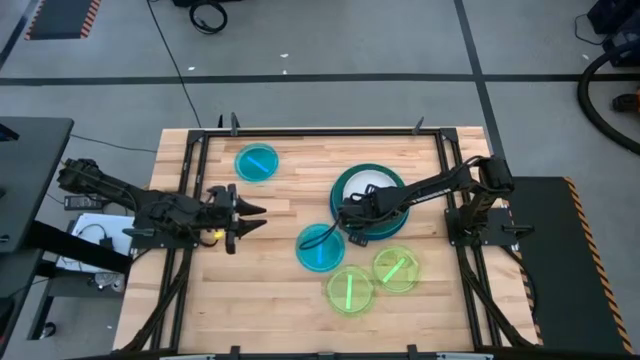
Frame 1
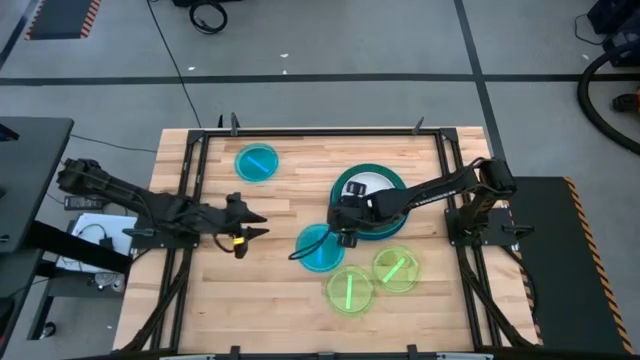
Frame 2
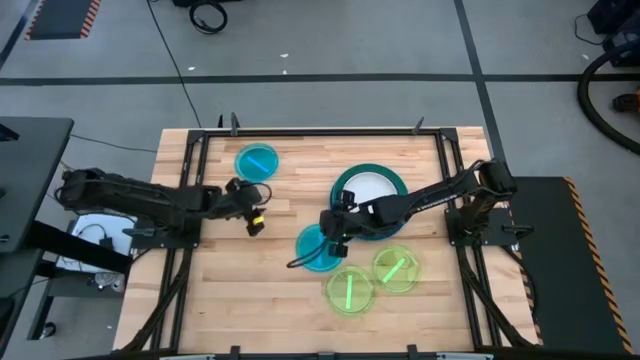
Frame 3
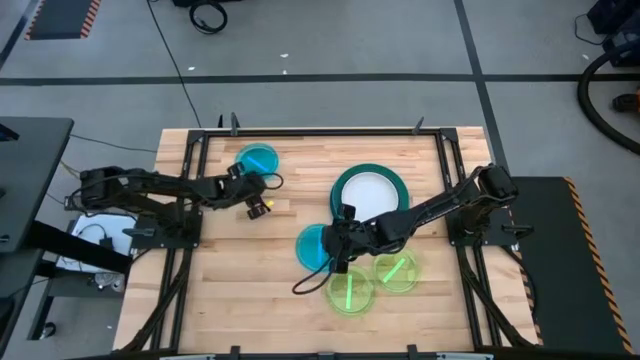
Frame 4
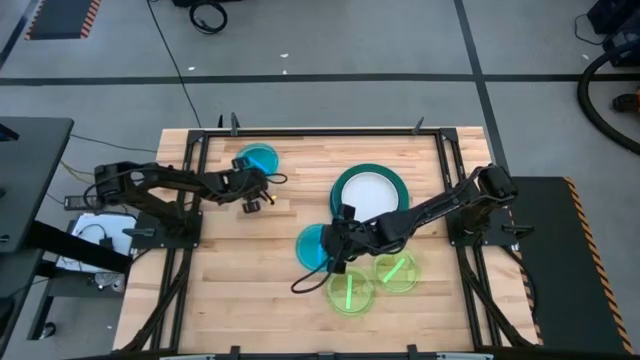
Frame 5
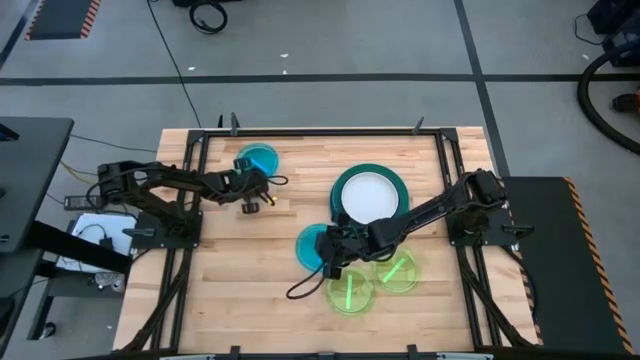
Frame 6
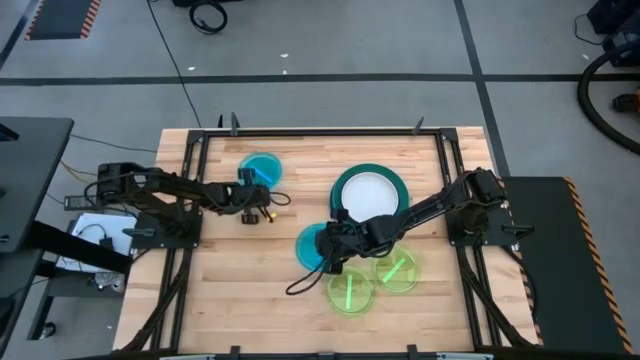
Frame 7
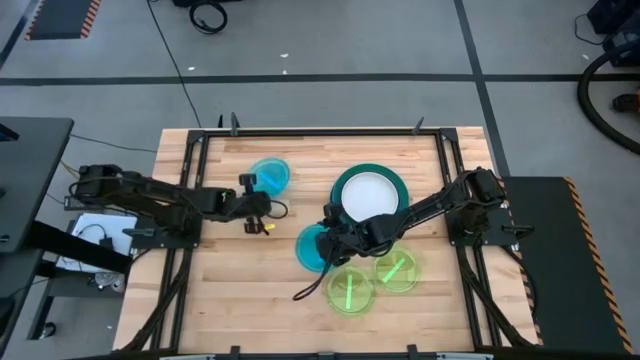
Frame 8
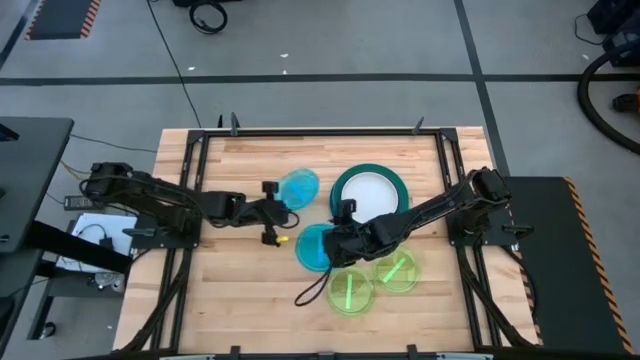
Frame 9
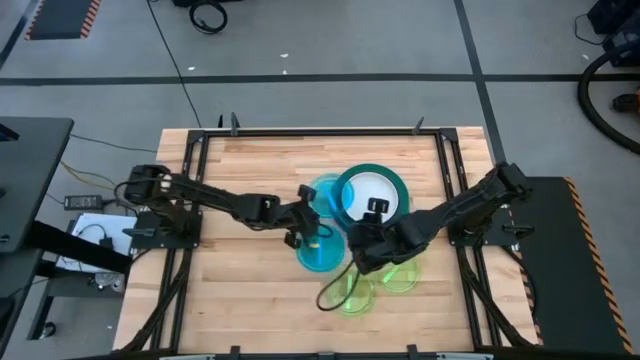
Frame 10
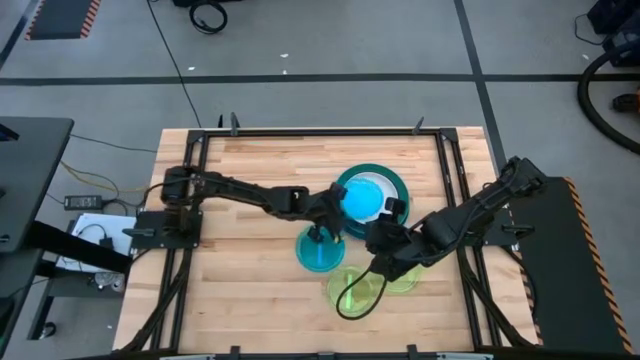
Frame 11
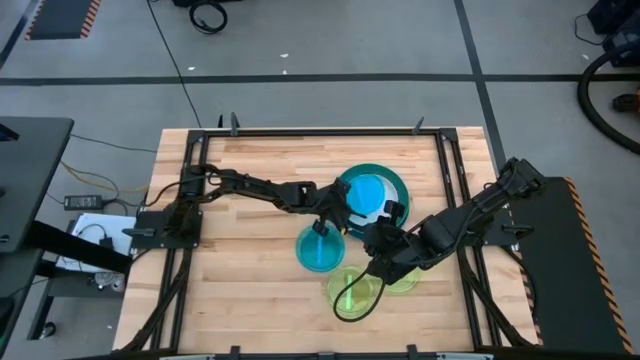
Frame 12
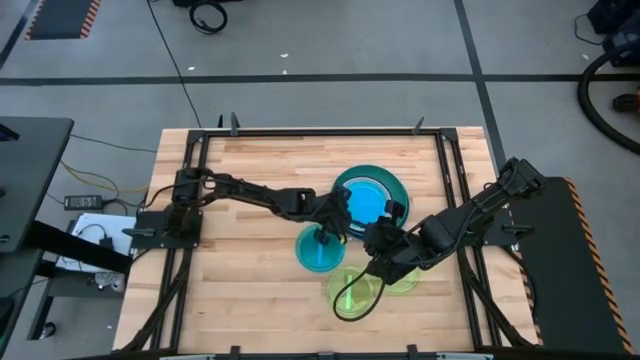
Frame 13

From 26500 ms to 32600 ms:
Task: Stack plastic plates
Stack the top light blue plate on top of the white plate

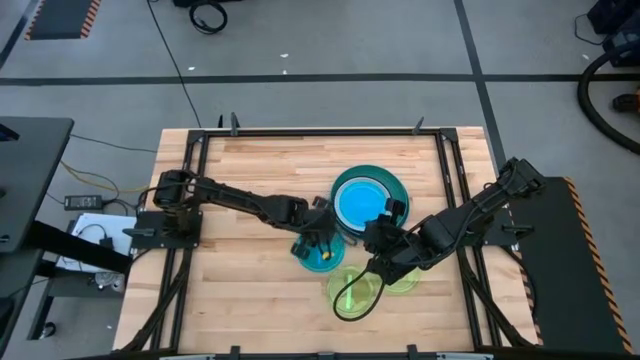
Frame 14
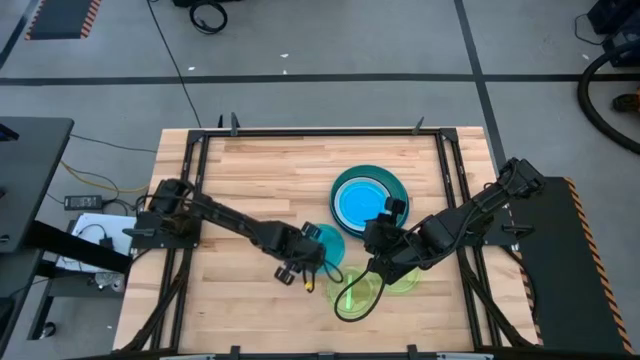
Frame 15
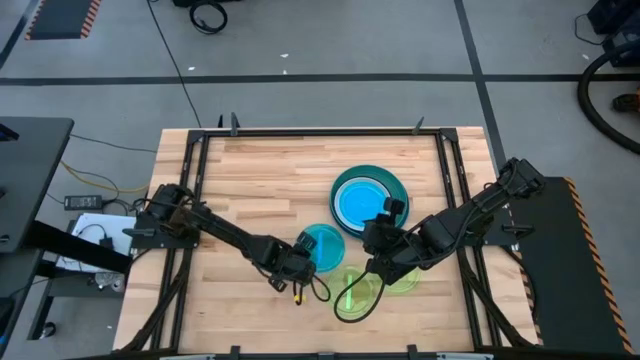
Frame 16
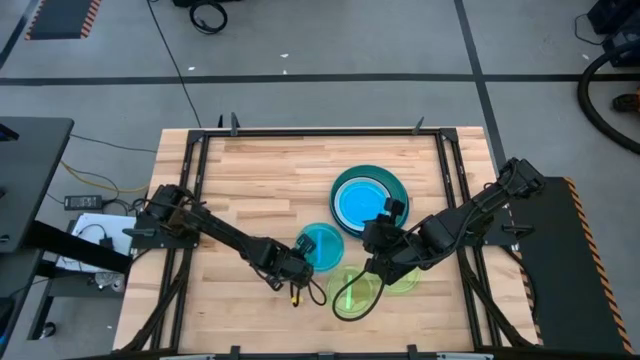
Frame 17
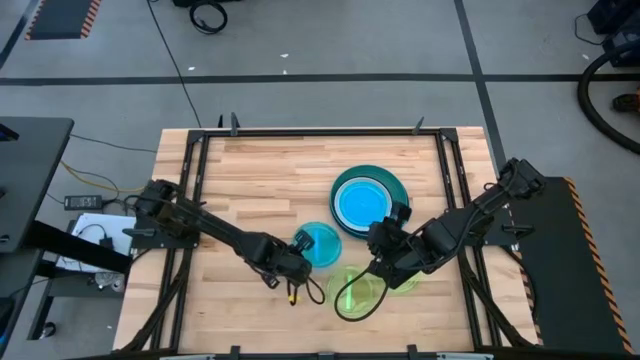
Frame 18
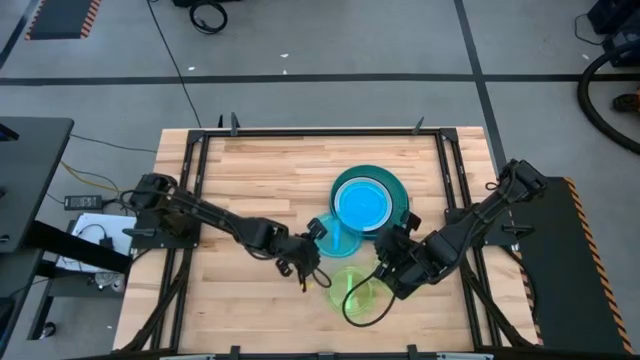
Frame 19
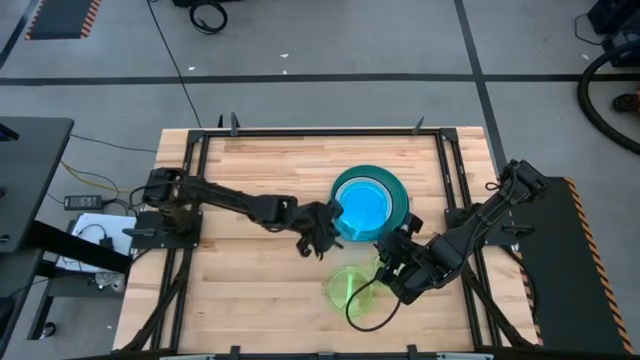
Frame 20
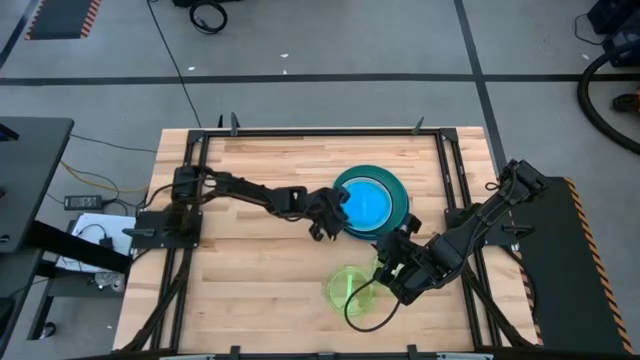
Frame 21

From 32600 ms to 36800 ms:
Stack the light blue plate on top of the light blue plate

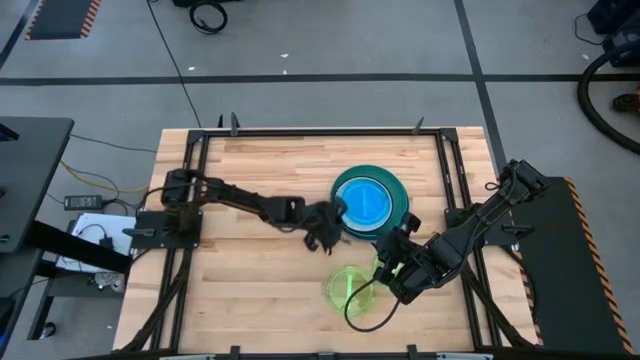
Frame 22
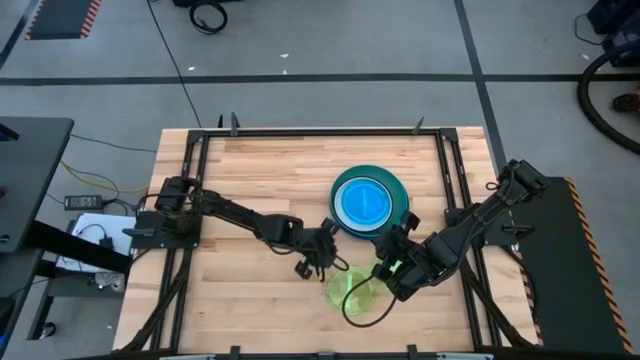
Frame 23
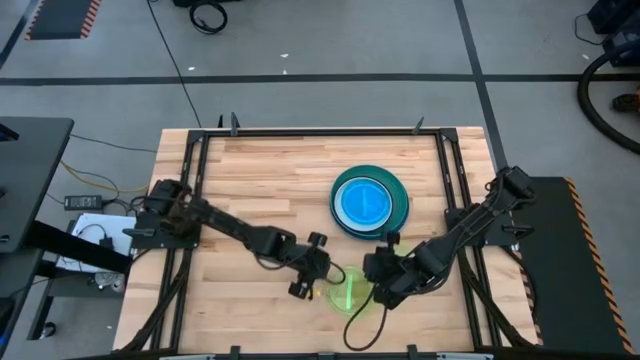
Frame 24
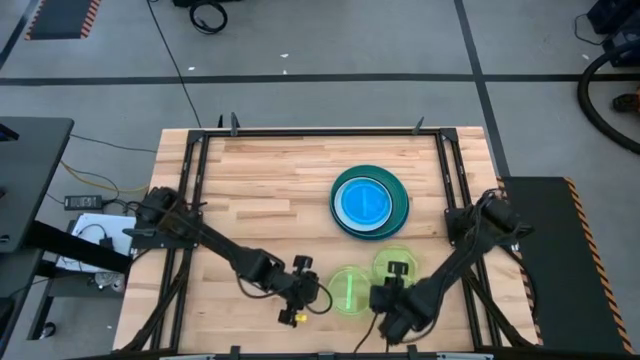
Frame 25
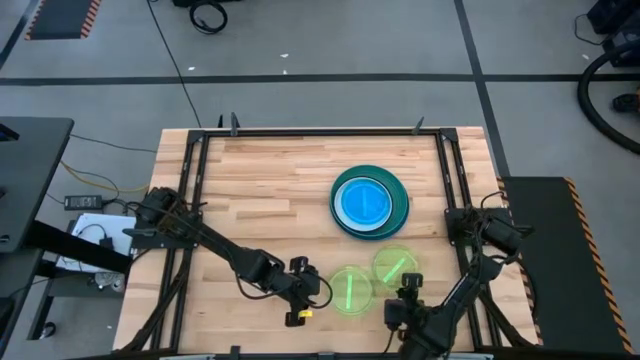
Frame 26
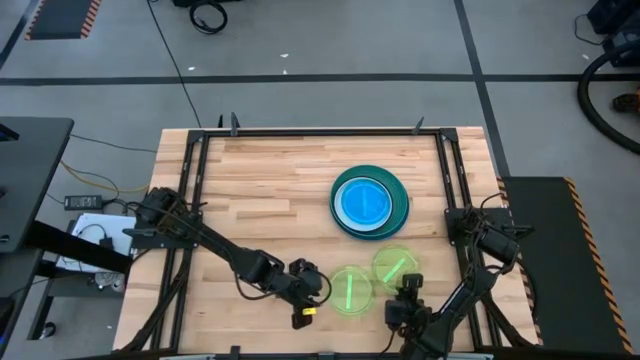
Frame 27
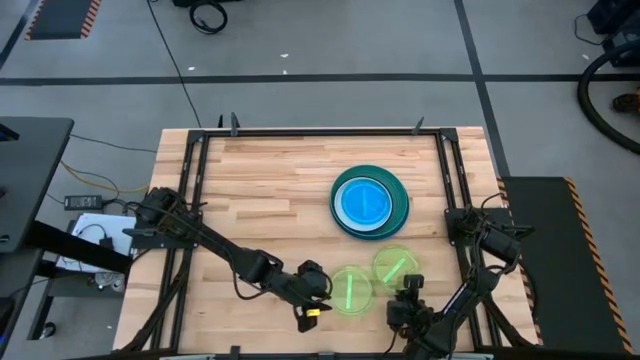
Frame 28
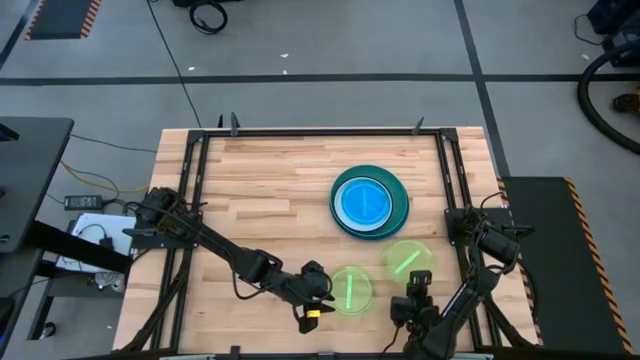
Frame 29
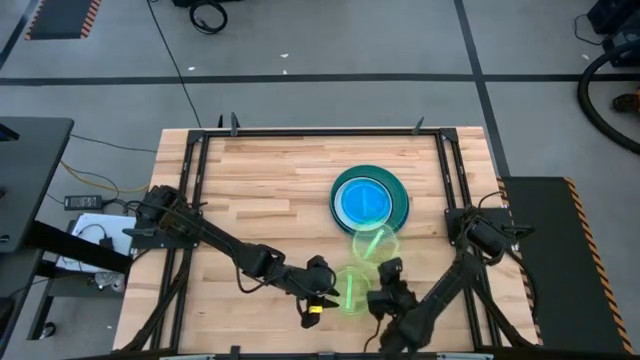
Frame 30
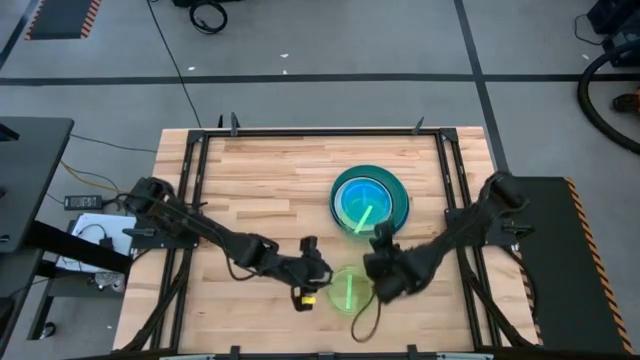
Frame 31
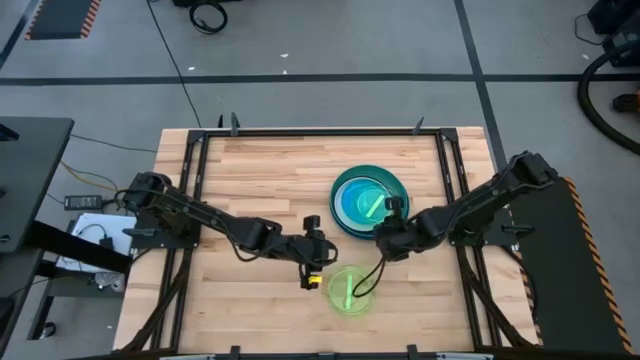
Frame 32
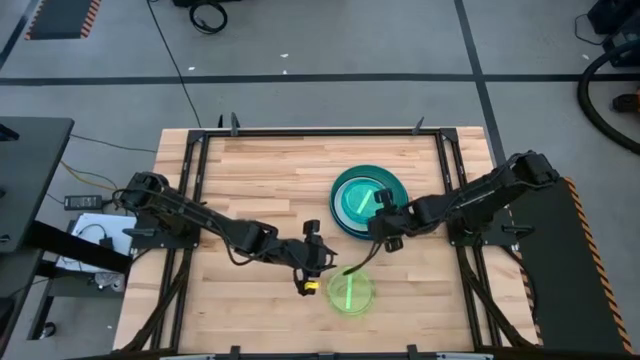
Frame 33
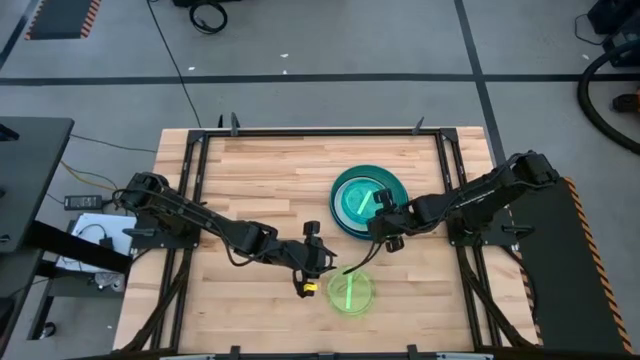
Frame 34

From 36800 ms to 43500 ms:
Stack the right light green plate on top of the light blue plate

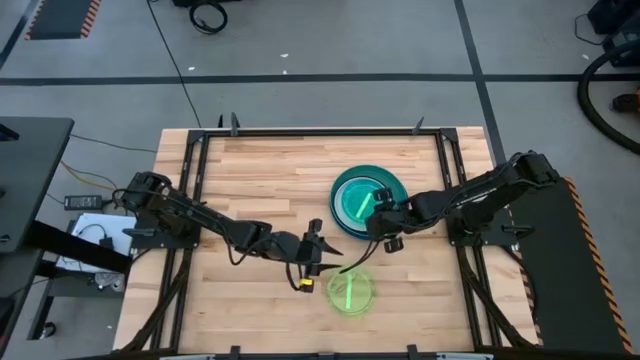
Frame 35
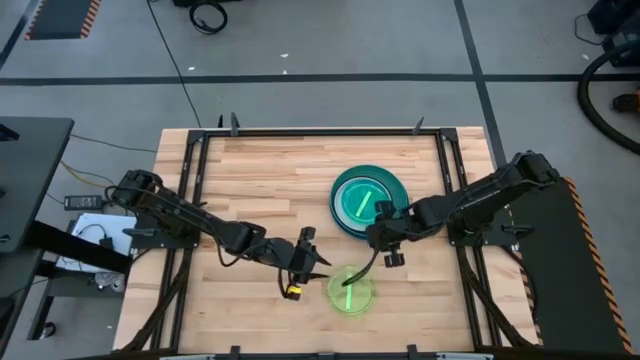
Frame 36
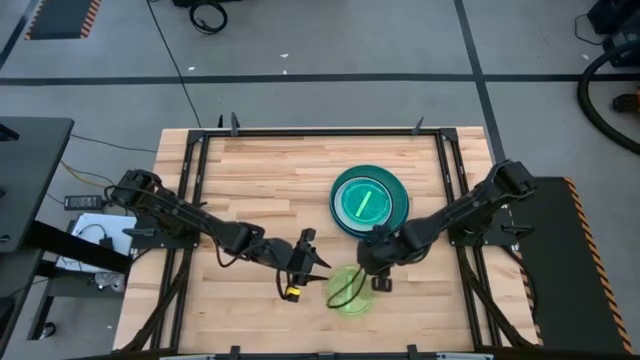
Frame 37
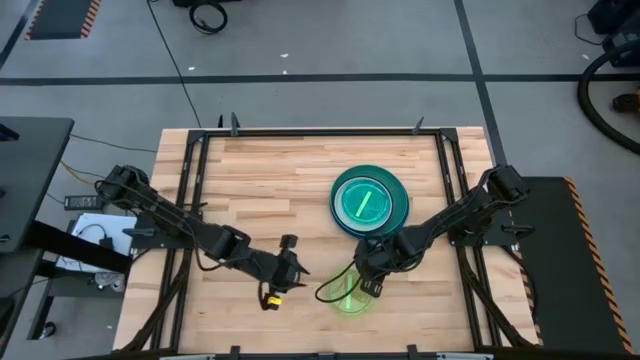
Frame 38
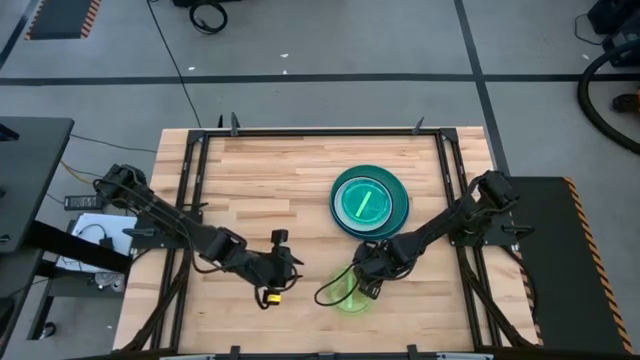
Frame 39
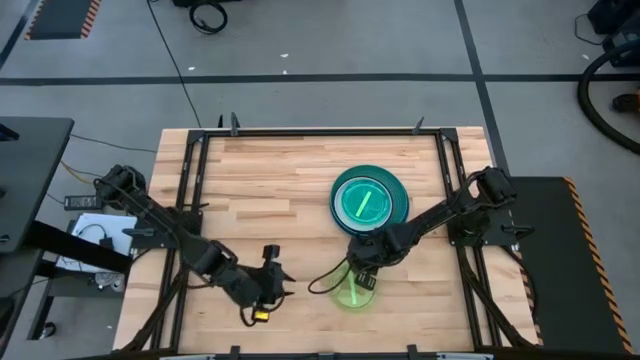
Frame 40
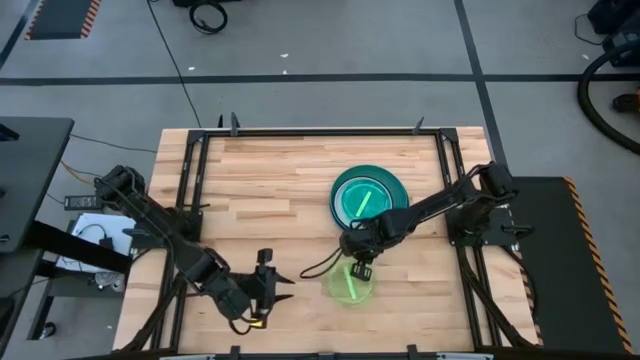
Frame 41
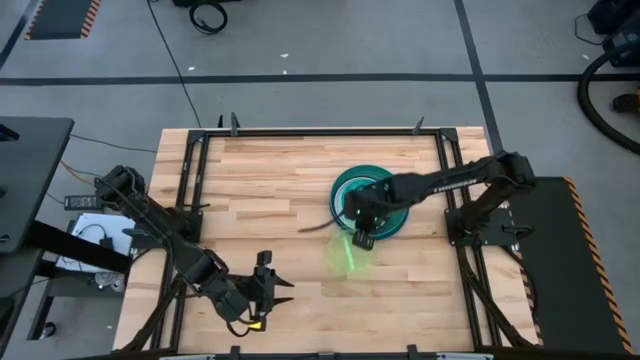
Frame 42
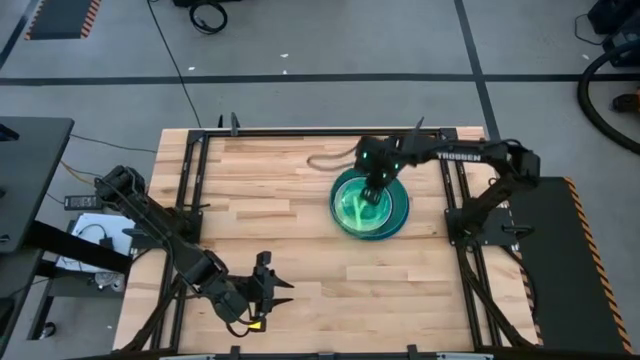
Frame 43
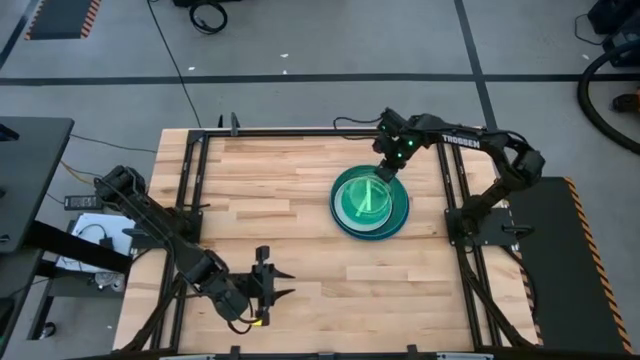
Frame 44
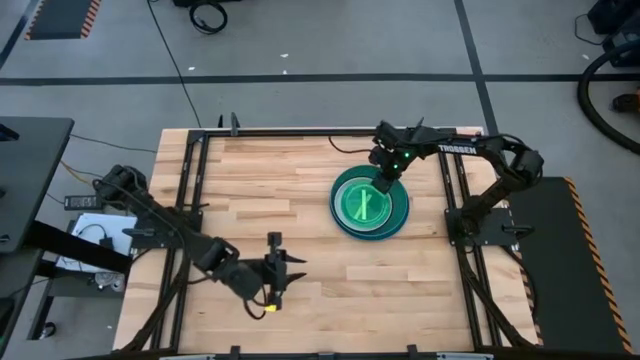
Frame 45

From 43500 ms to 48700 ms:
Stack the light green plate on top of the light green plate
